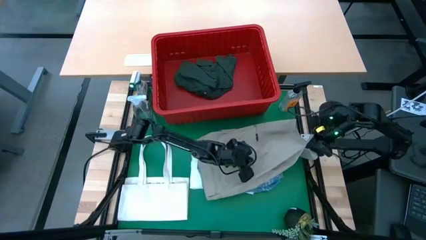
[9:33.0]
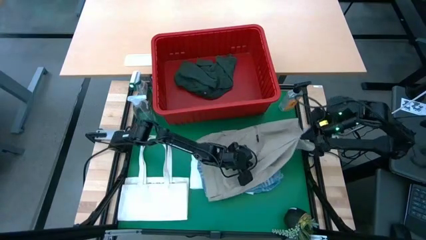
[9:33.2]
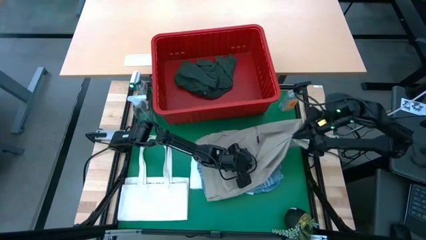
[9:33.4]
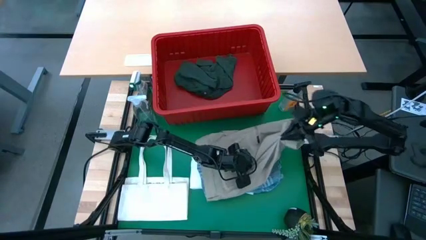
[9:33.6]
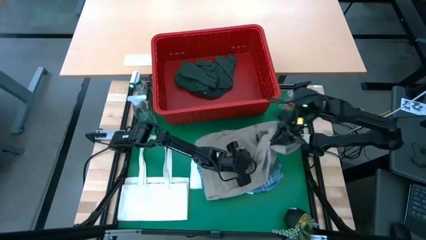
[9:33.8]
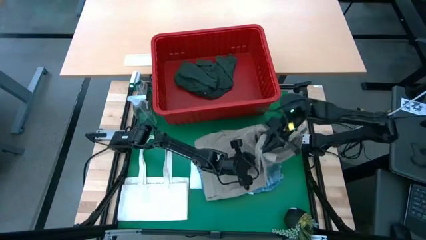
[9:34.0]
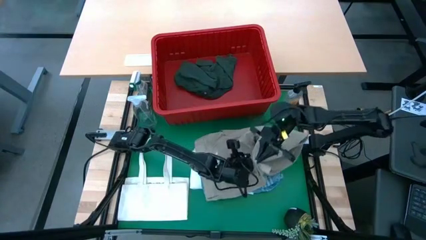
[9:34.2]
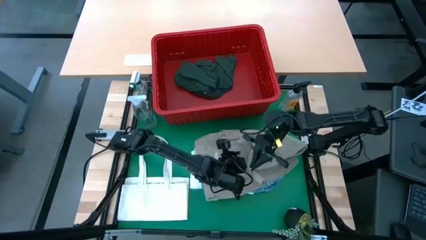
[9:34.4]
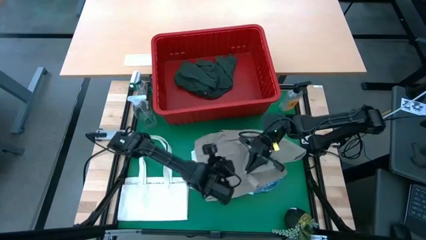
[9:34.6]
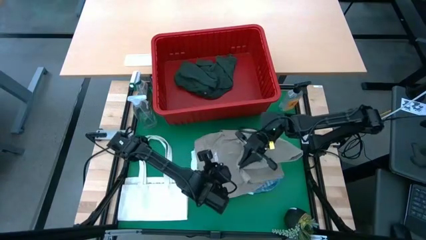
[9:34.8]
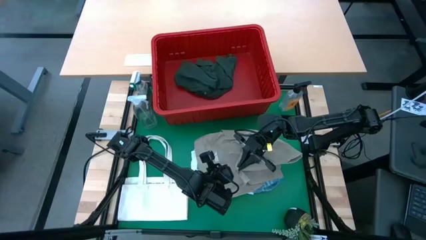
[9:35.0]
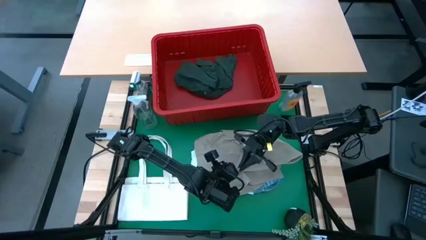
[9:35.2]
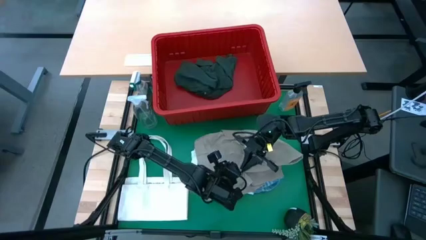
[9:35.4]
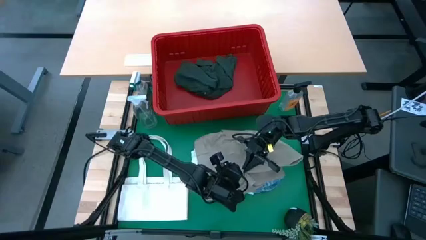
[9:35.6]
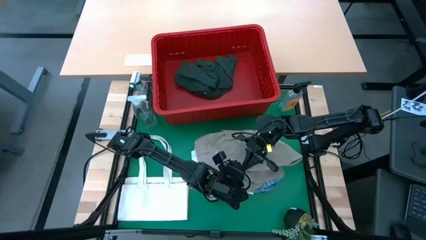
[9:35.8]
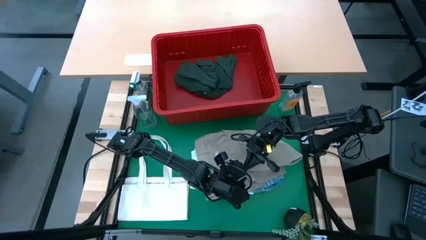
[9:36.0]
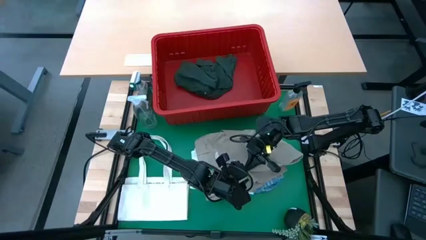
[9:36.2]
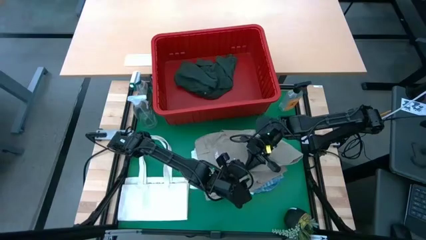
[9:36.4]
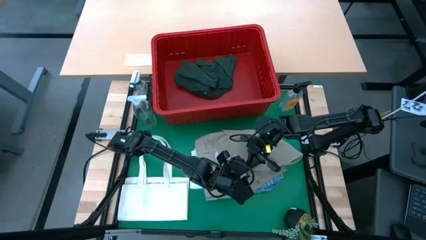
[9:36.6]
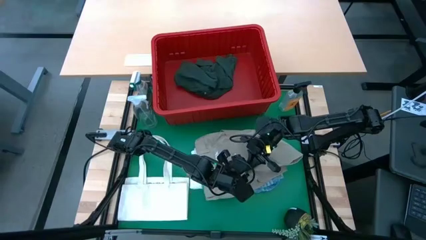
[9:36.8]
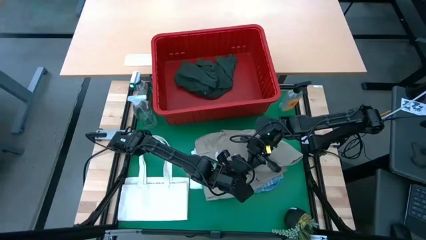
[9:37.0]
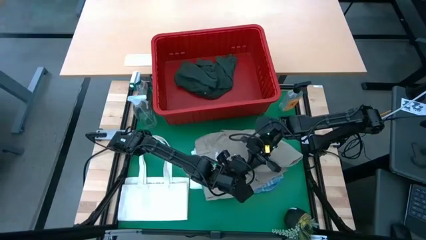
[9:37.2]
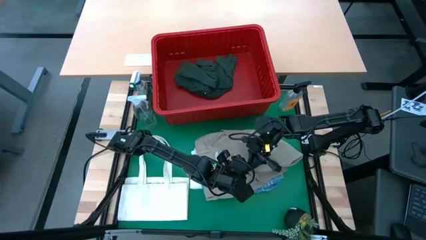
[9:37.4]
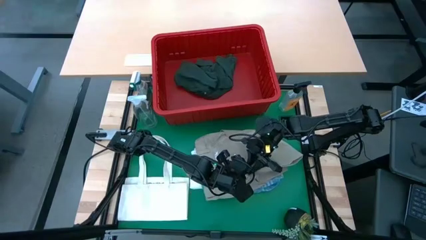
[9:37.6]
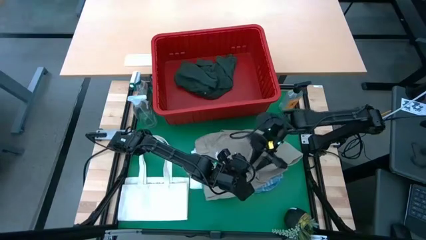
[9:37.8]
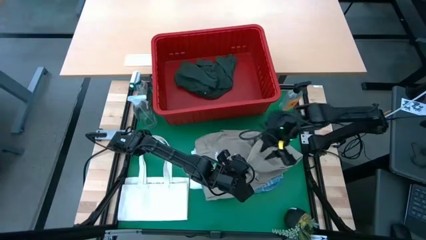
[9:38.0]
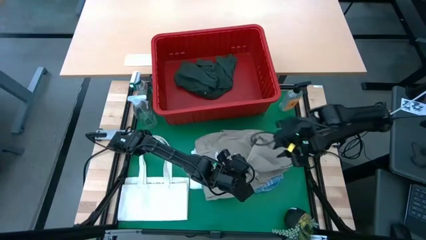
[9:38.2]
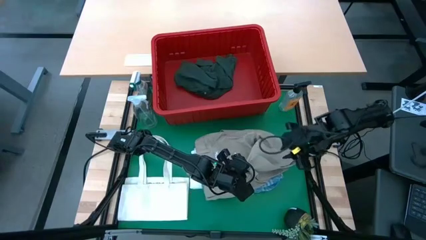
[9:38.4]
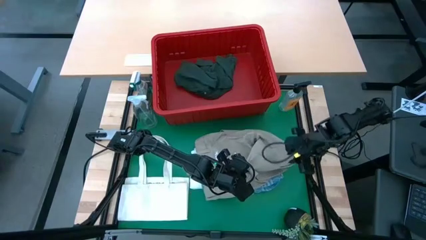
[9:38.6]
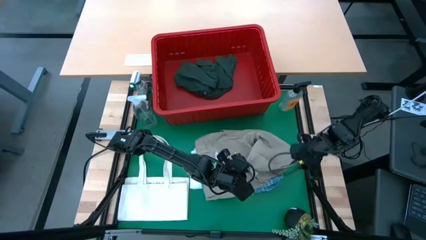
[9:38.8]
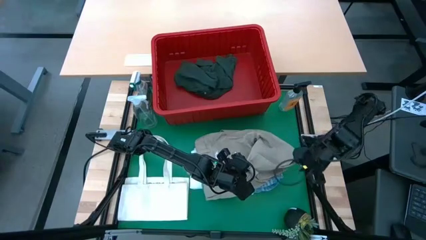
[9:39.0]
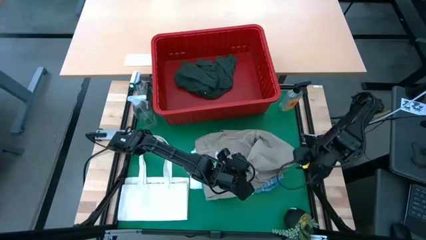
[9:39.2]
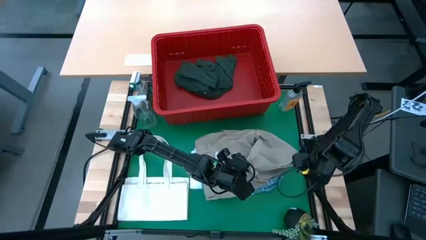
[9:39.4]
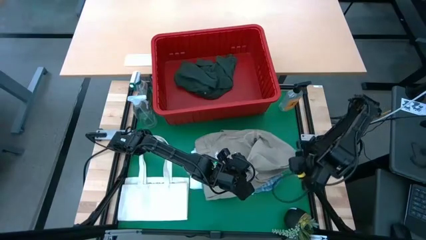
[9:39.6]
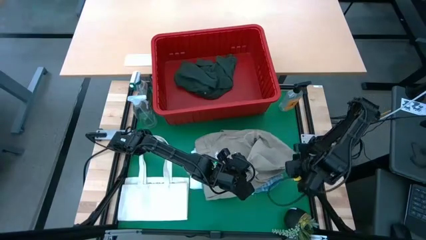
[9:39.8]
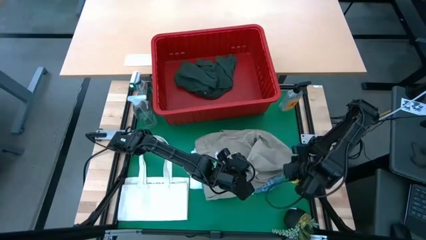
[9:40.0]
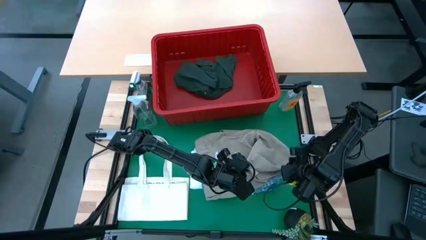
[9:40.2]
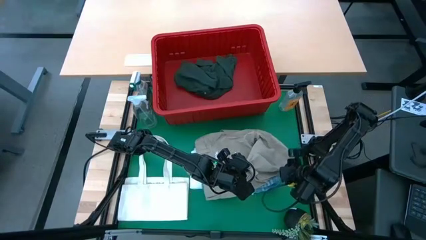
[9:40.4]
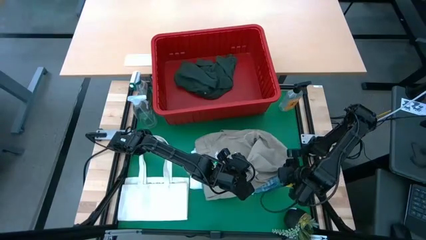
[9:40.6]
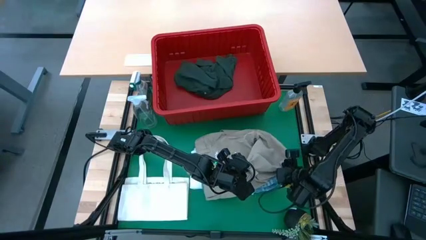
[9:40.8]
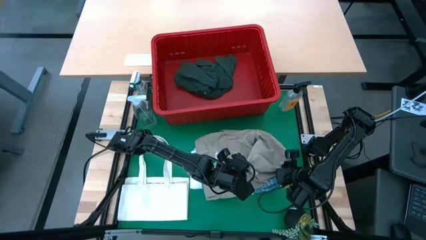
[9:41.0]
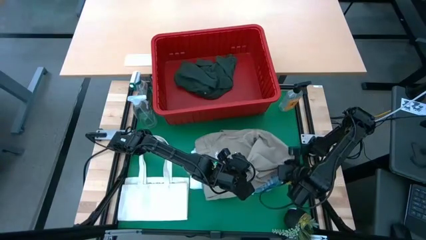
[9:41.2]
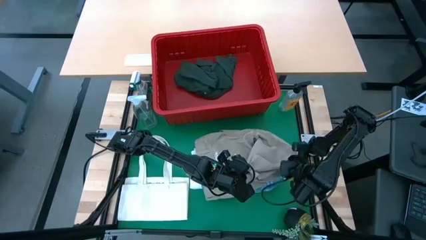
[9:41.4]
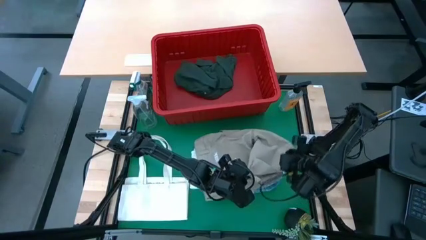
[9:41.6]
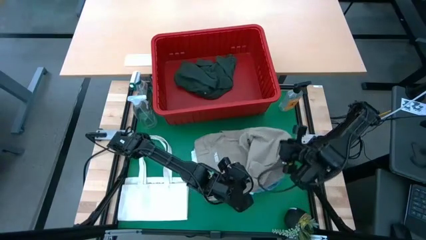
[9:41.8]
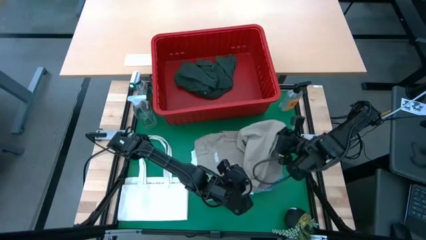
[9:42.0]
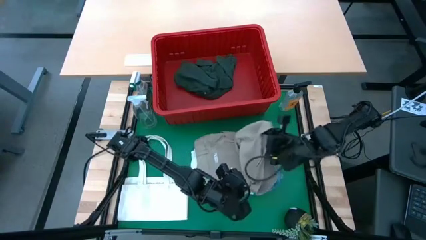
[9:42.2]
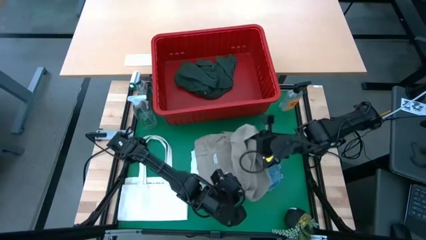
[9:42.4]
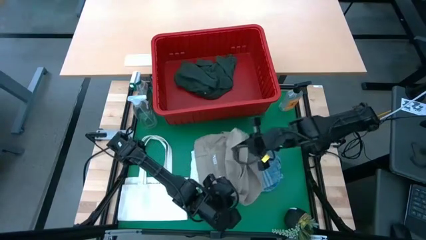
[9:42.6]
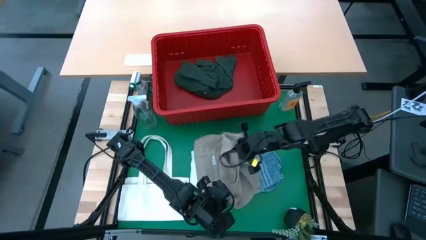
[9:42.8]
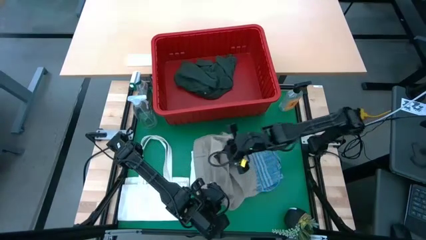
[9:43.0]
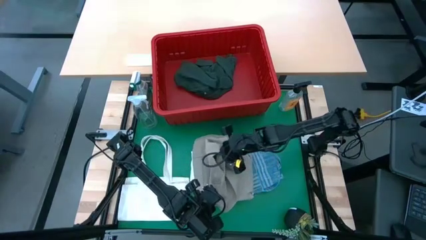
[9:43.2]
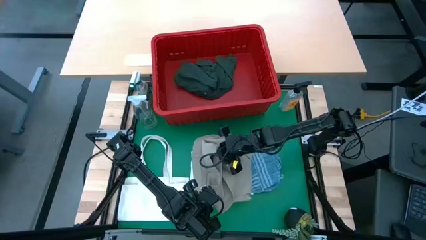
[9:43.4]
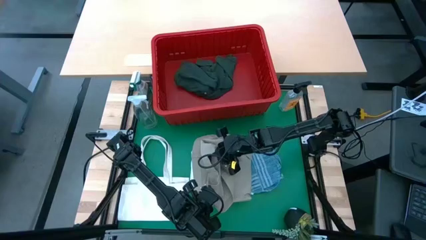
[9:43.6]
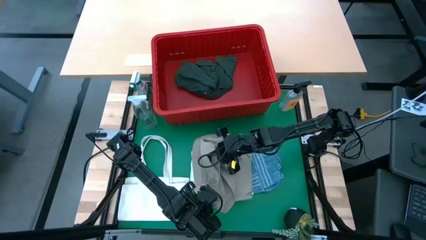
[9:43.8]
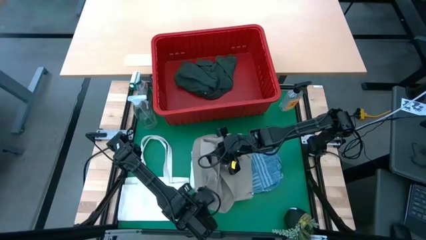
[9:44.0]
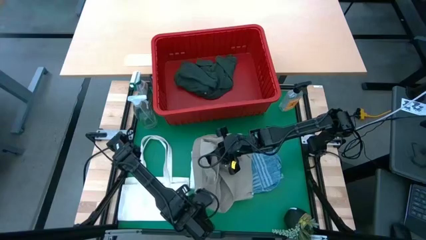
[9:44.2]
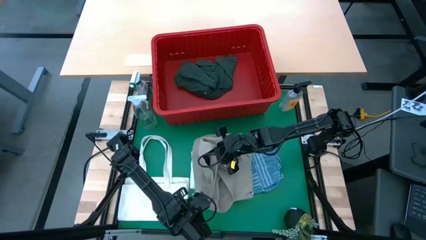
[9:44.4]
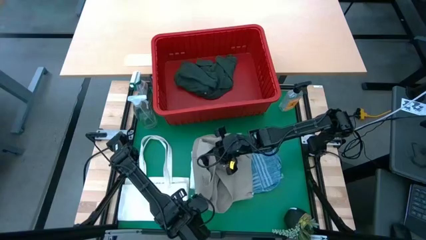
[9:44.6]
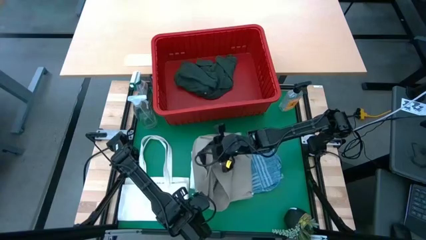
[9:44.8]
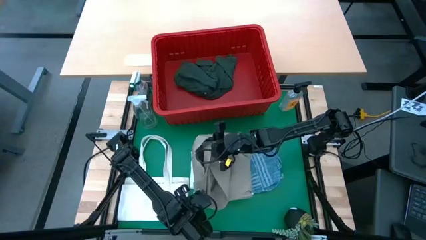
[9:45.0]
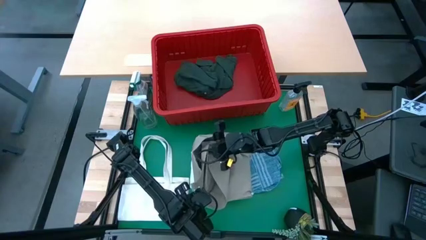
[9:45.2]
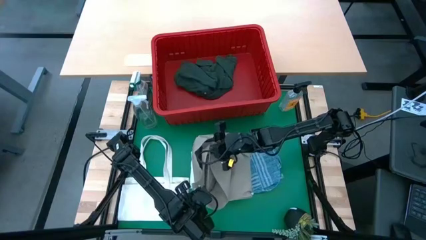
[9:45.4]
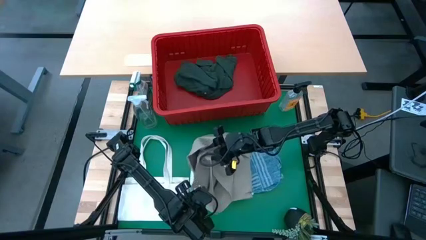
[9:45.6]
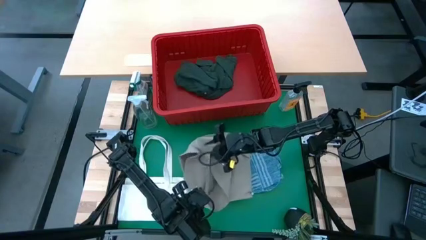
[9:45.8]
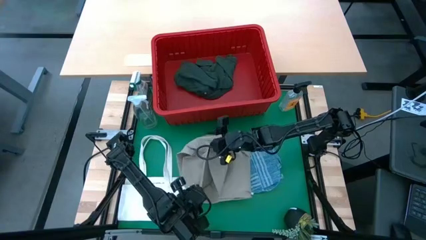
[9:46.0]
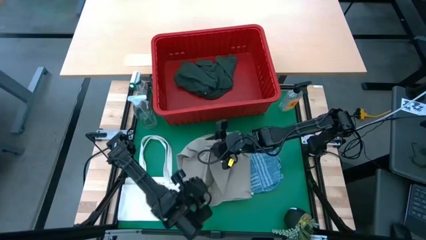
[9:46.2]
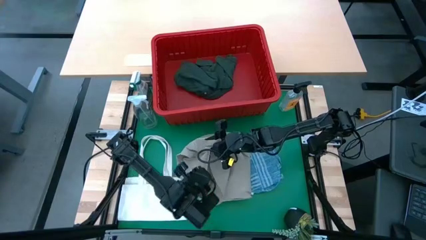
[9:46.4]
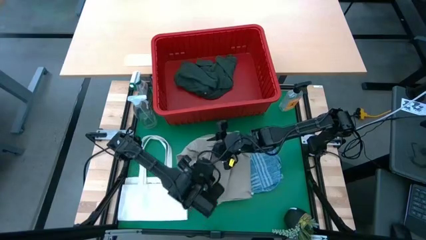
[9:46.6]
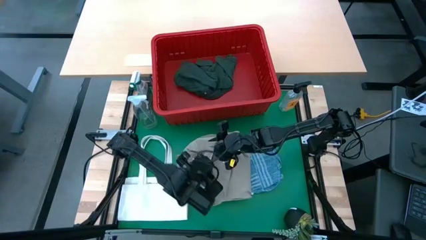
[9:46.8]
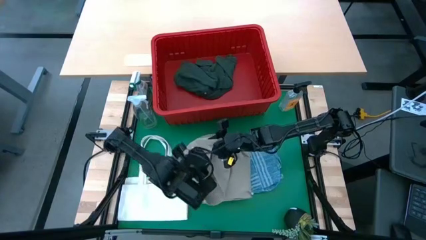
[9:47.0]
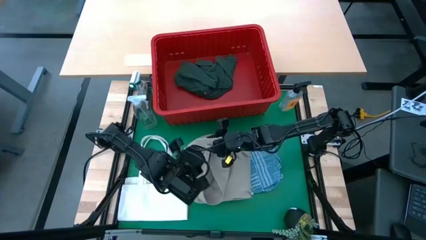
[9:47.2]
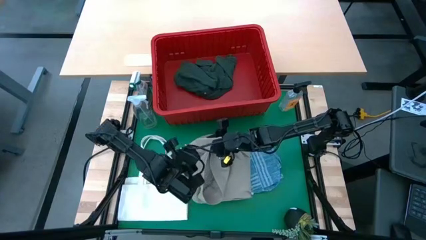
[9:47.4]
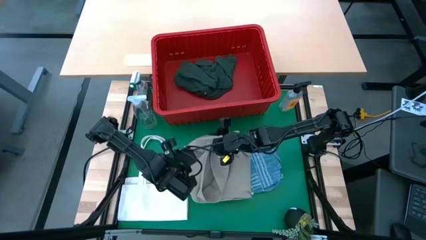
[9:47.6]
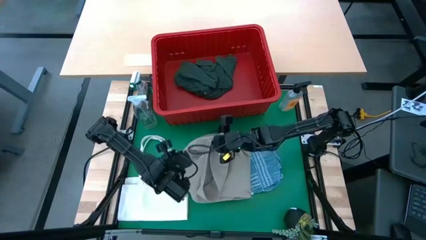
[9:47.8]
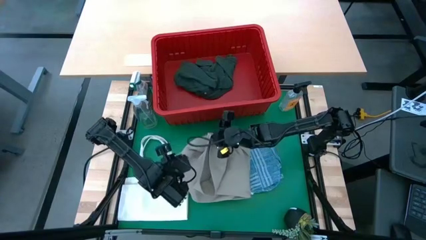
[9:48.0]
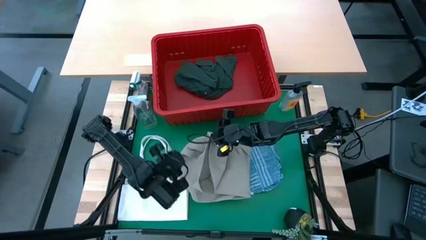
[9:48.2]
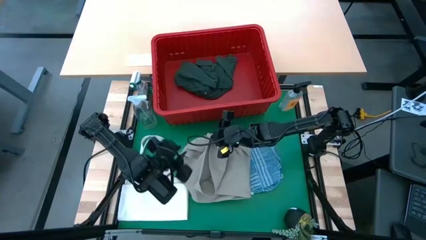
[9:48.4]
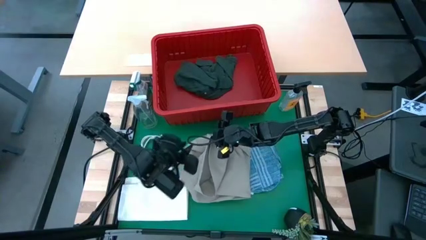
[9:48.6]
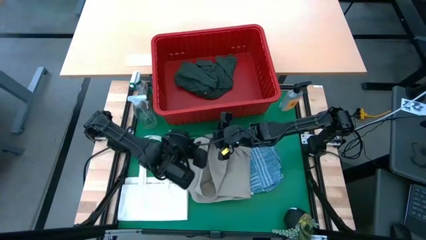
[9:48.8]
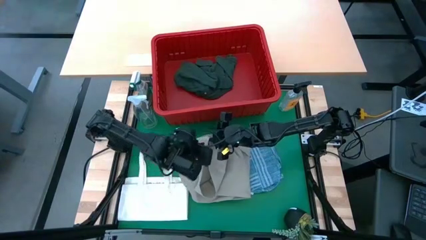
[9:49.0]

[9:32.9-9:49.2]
Task: Fold Laundry from Bin
Fold the light brown shorts
